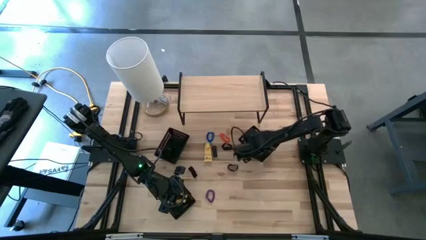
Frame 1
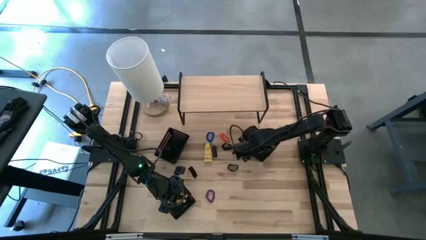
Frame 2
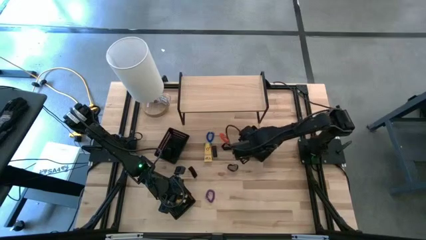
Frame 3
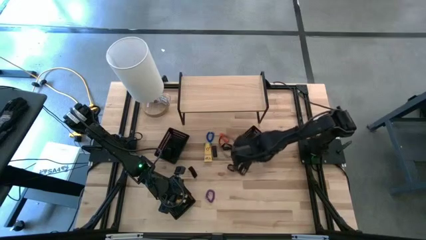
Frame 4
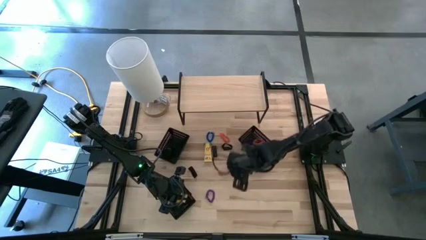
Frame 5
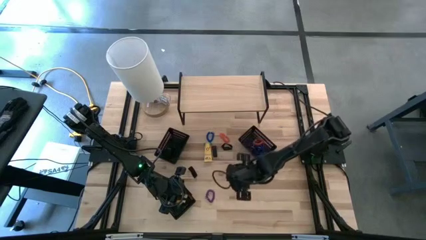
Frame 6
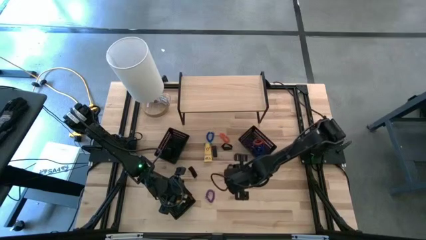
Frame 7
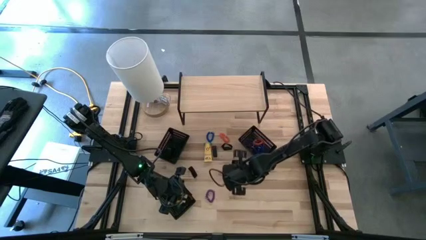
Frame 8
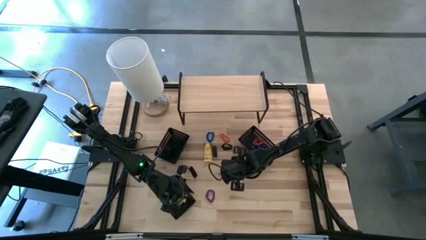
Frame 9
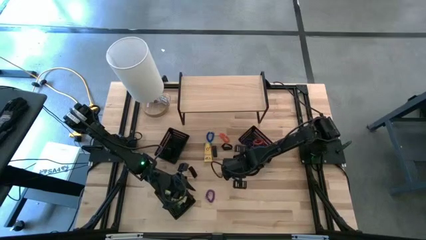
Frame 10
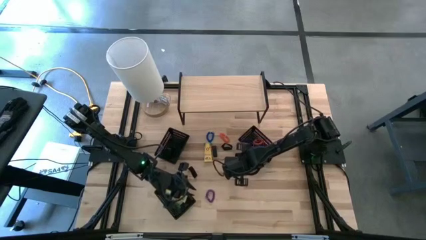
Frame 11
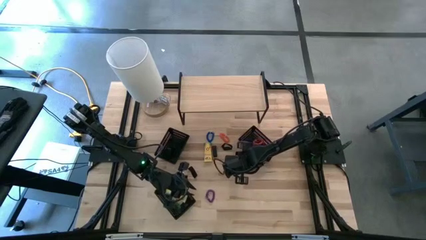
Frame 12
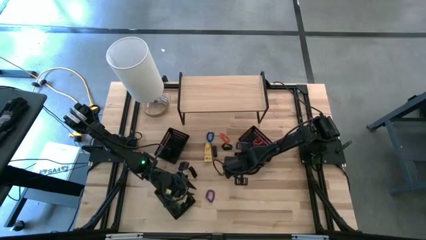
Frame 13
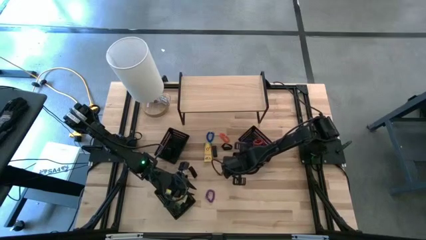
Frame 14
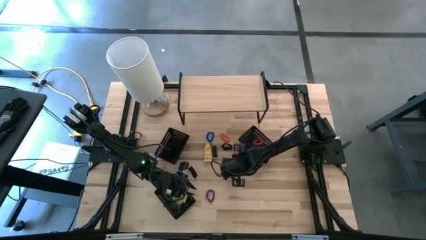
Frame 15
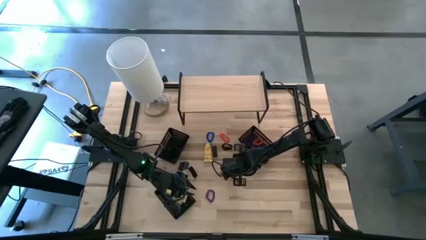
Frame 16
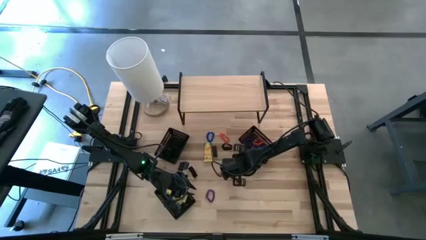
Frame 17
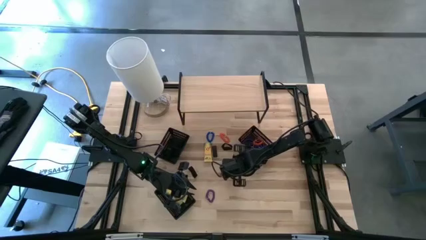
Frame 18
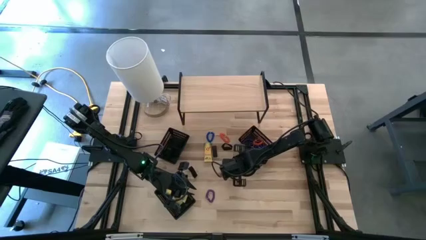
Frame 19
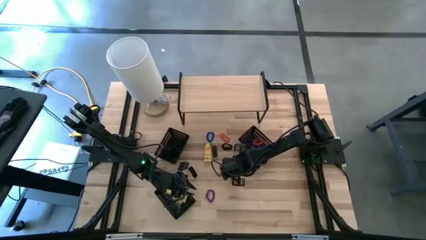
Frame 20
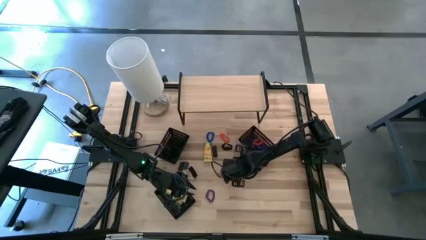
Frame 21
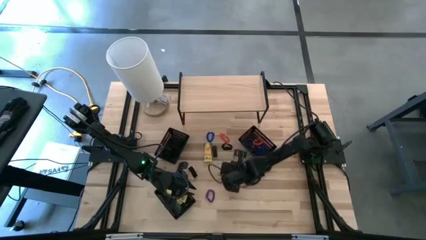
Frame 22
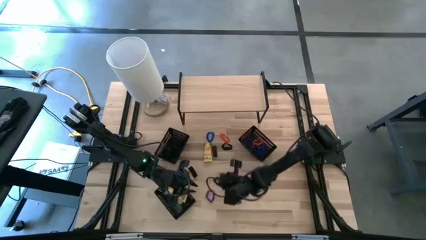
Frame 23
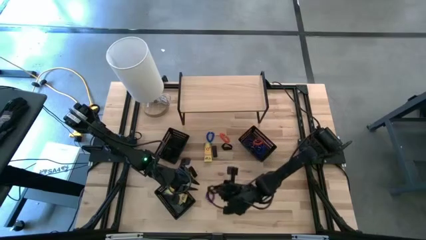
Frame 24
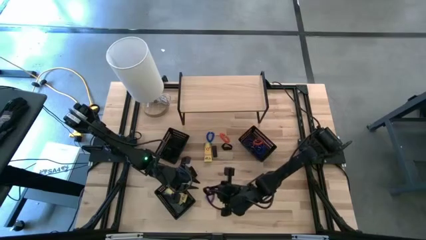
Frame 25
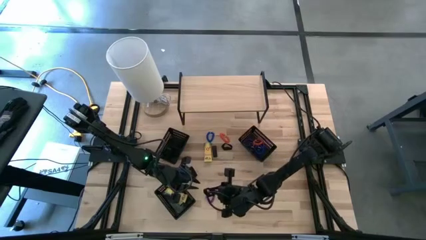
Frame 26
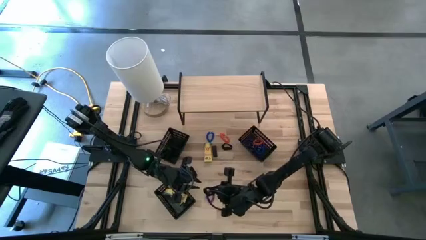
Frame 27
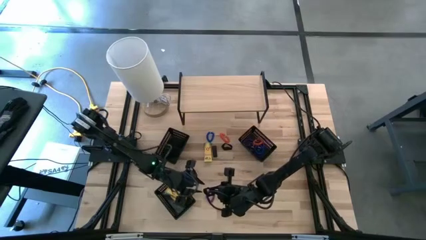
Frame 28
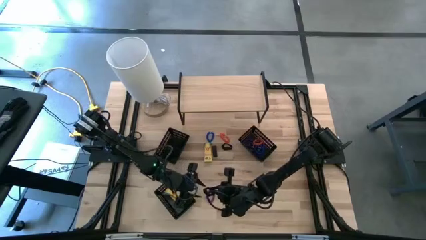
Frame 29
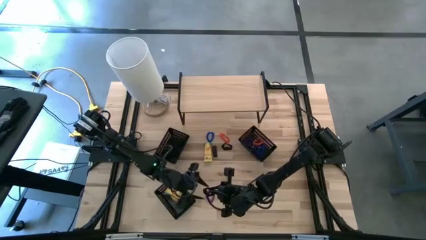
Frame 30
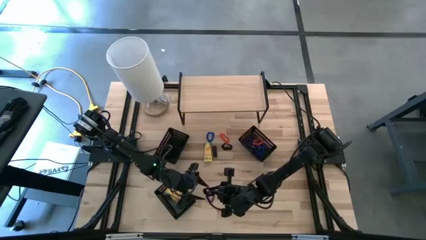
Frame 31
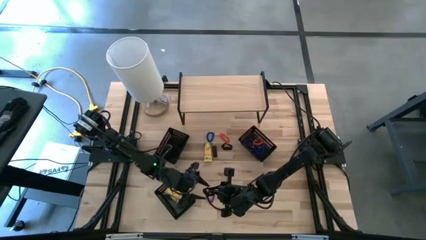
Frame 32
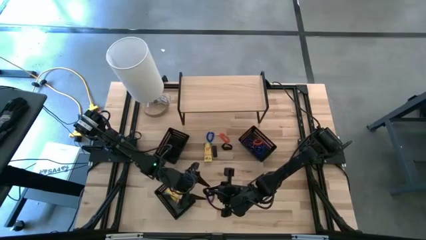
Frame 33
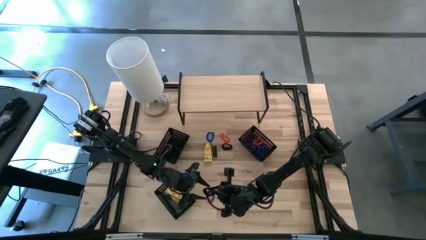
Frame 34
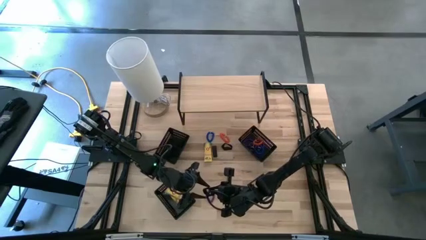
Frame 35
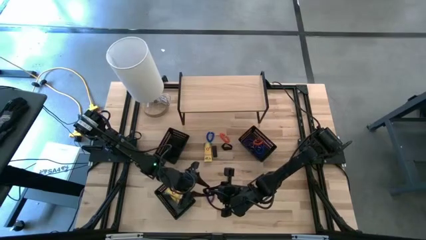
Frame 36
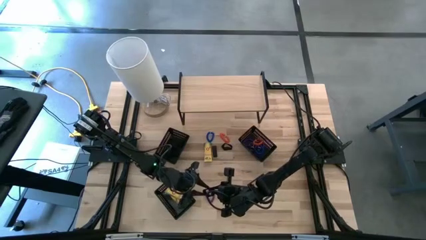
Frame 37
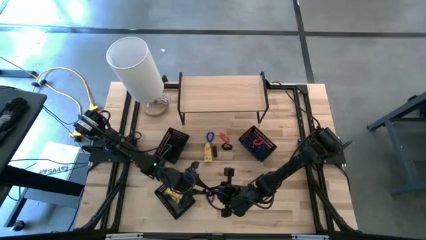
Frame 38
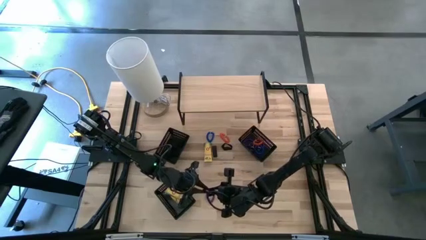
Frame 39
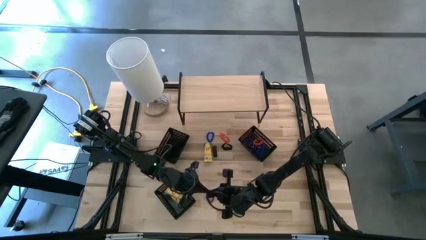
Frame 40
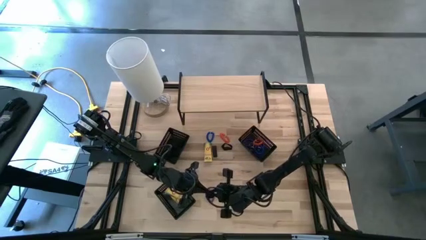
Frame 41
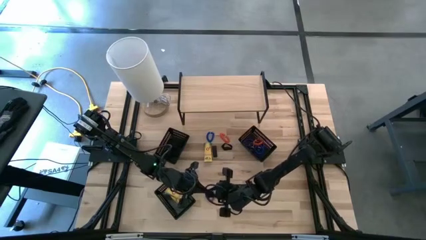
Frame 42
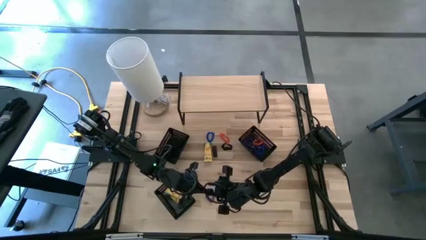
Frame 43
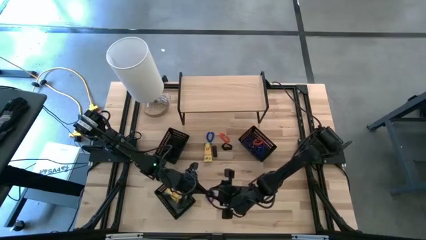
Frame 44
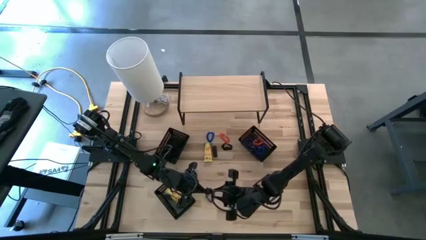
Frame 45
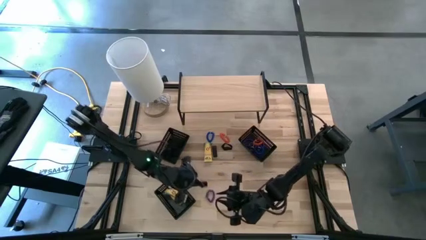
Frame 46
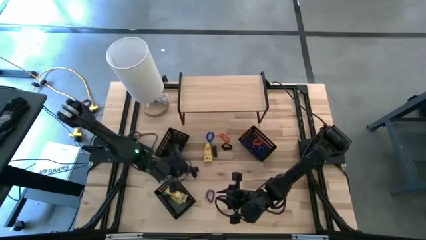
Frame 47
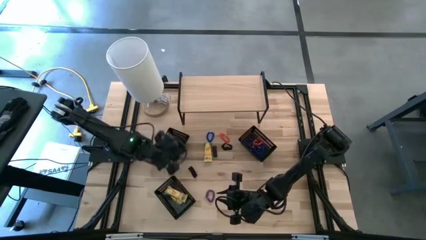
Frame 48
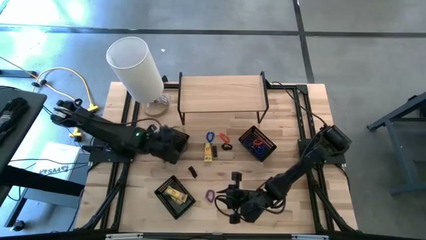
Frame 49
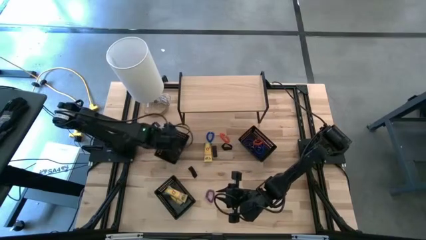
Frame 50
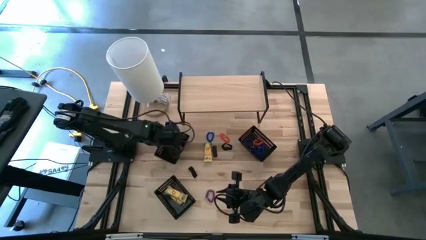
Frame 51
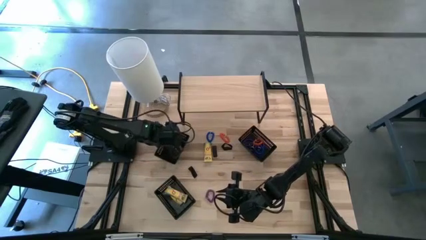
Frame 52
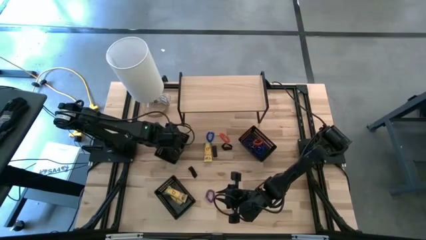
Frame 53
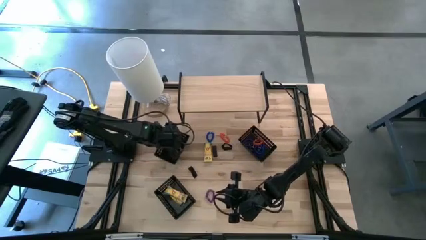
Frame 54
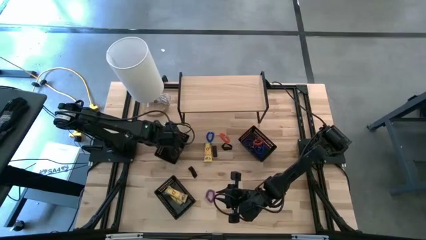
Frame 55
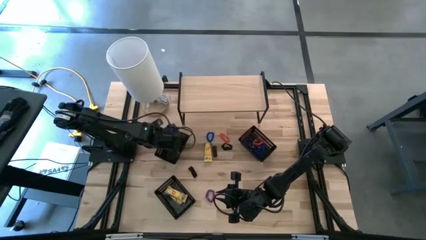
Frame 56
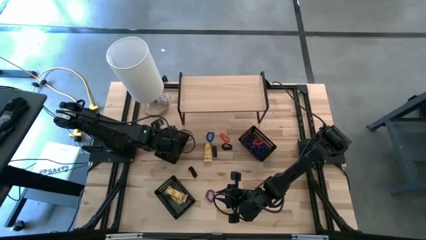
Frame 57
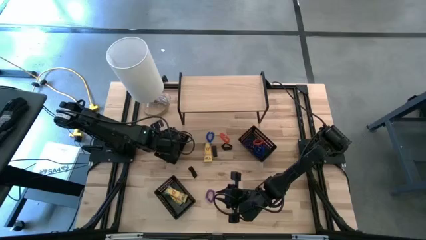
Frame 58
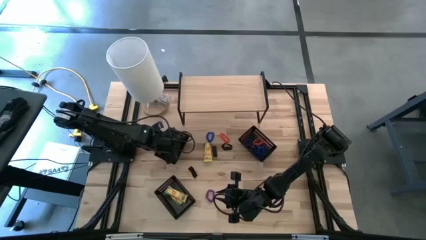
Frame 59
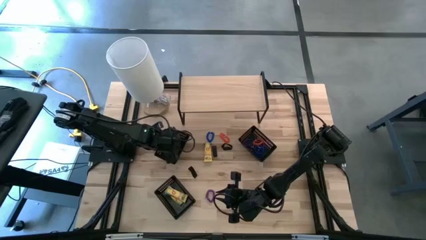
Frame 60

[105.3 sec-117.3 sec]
Task: Pick & Place Office Desk Supplies
Put the black rubber band into the top left black bin

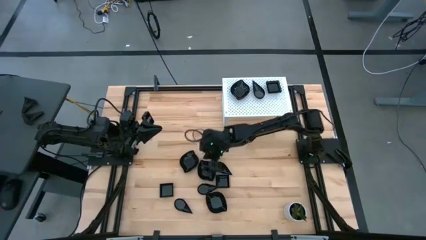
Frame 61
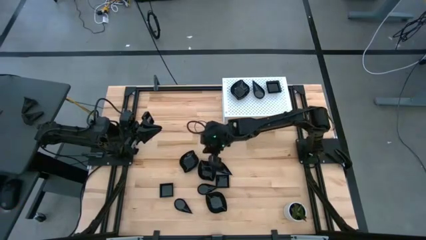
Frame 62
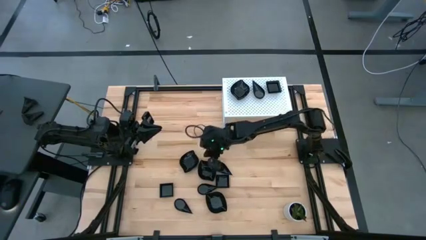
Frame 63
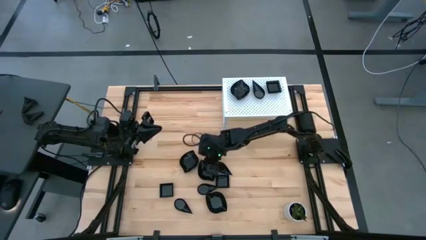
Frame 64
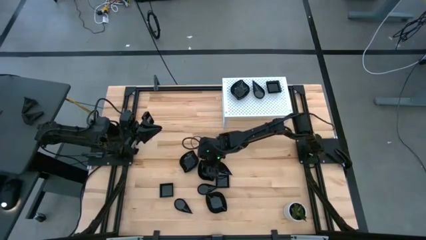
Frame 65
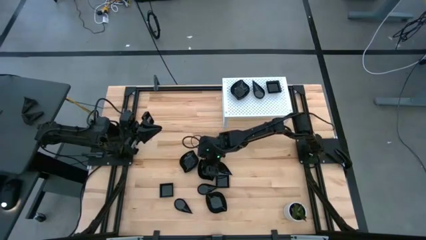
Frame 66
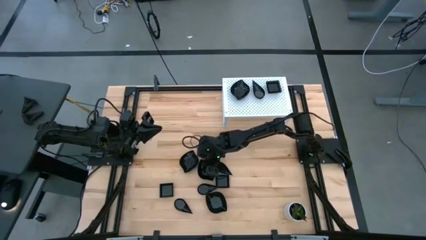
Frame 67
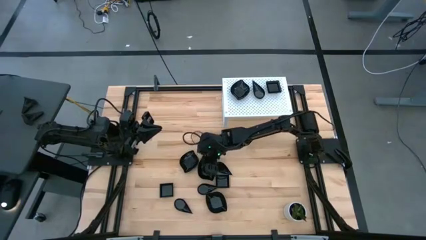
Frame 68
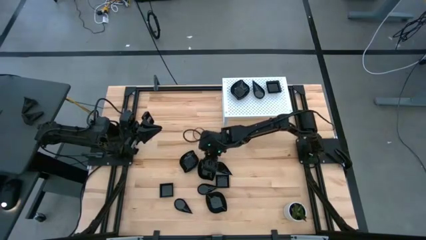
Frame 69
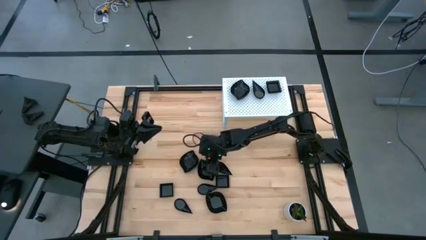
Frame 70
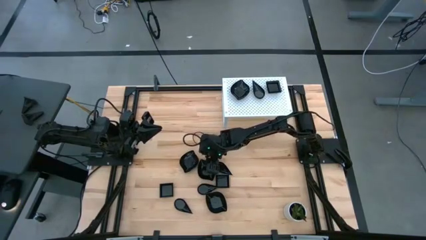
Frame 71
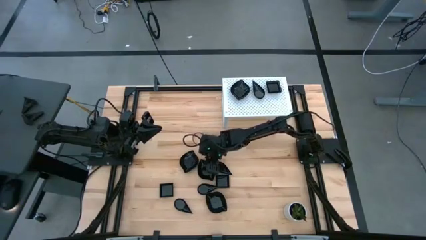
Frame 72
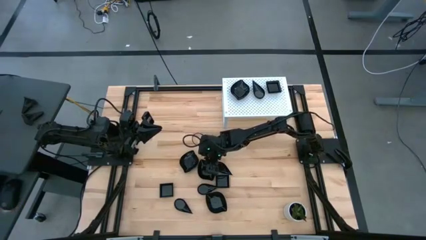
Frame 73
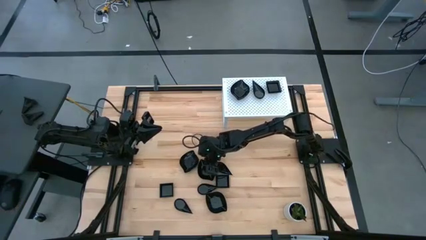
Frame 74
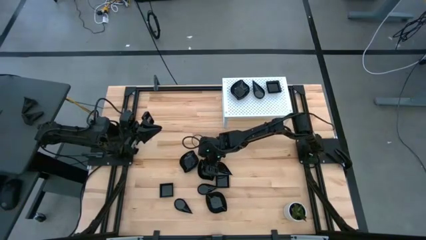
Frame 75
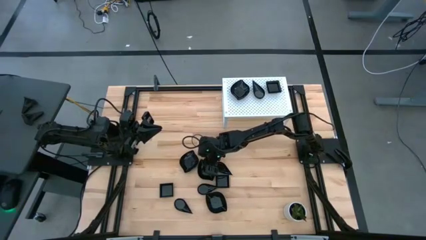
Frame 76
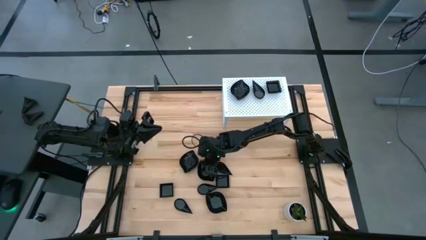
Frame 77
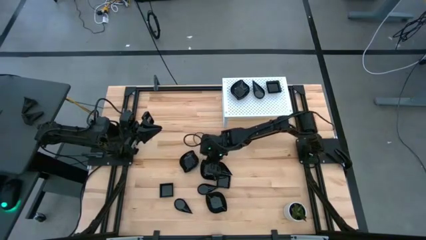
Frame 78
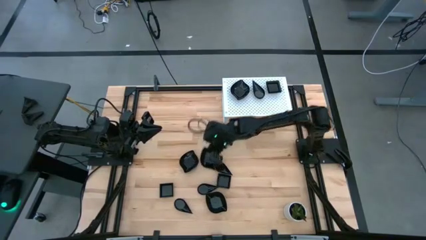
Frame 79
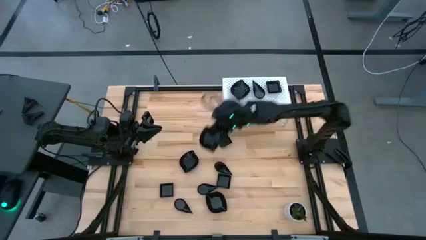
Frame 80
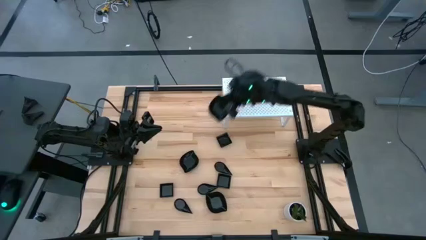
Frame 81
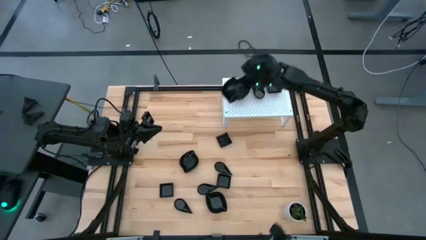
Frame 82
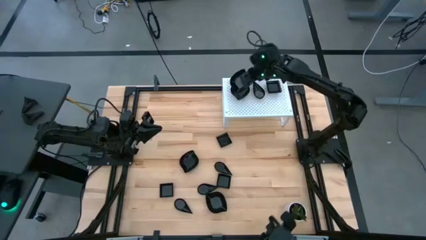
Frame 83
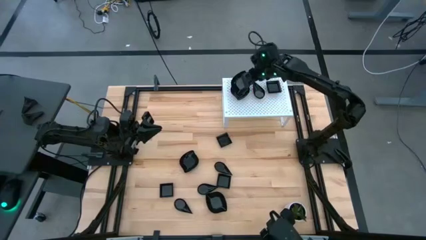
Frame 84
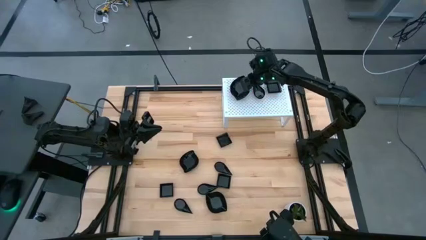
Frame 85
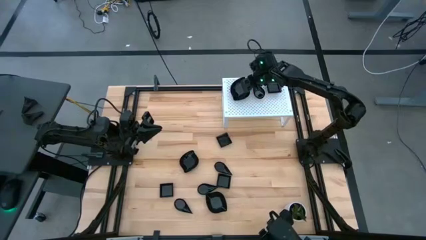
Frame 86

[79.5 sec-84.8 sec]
Task: Pick & Place Mini shaped plates
Stack the leaf shaped plate on top of the leaf shaped plates on the shelf
